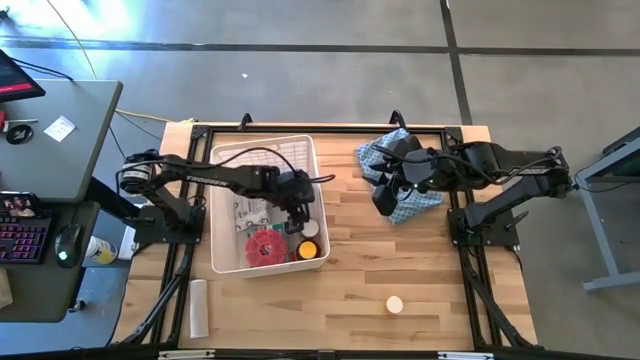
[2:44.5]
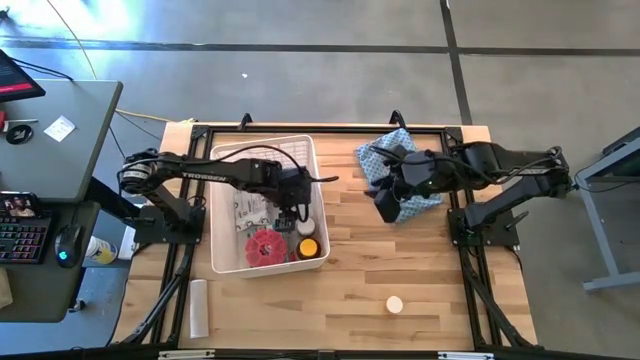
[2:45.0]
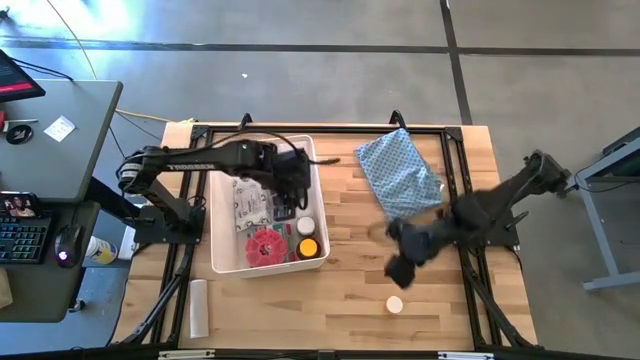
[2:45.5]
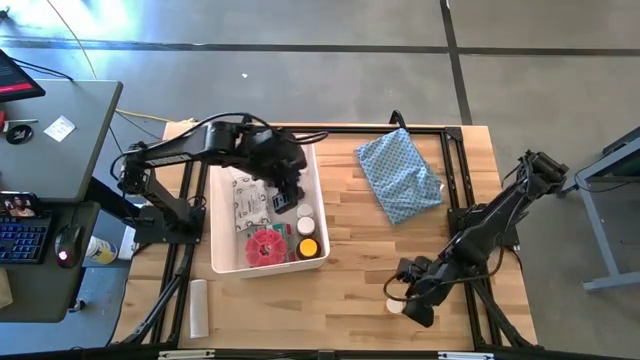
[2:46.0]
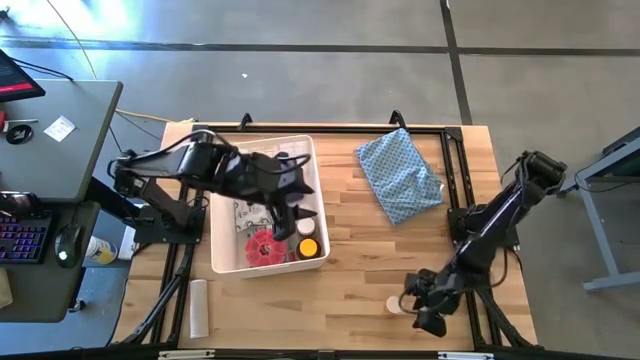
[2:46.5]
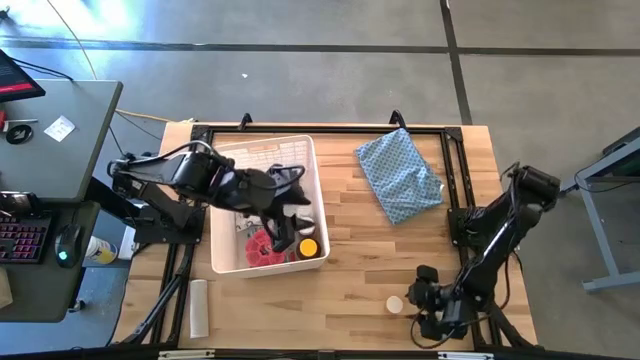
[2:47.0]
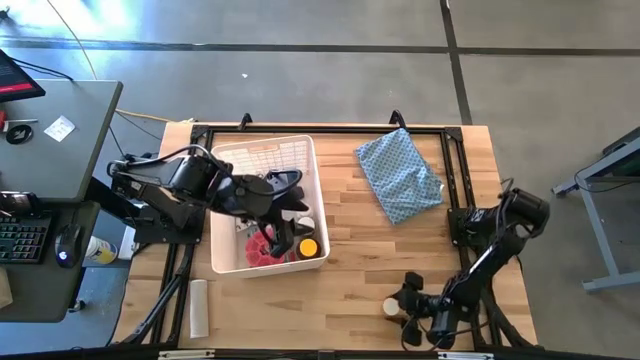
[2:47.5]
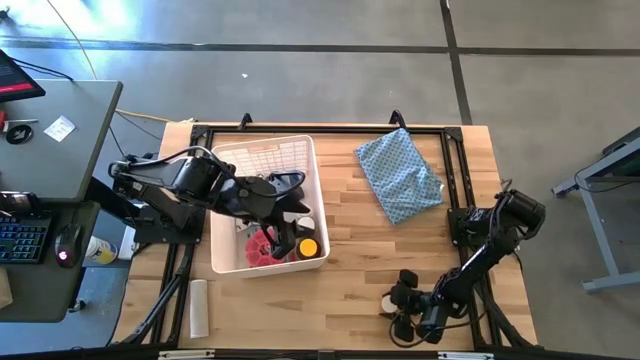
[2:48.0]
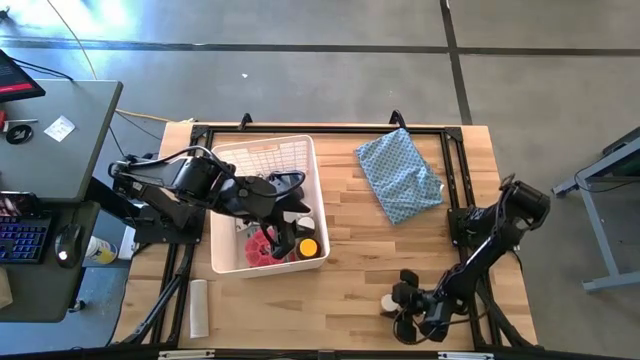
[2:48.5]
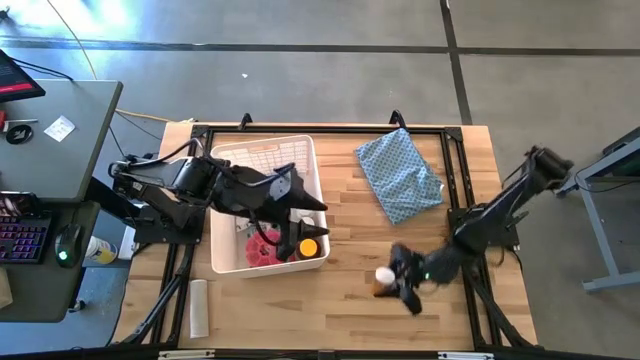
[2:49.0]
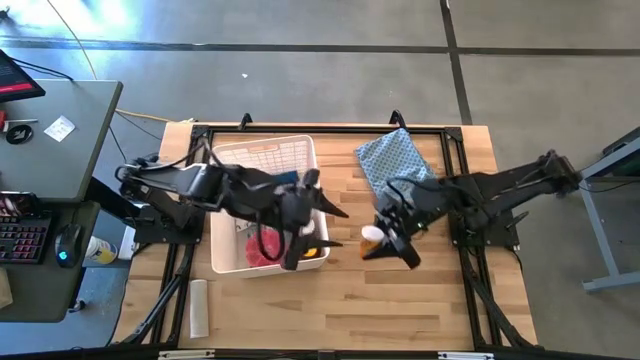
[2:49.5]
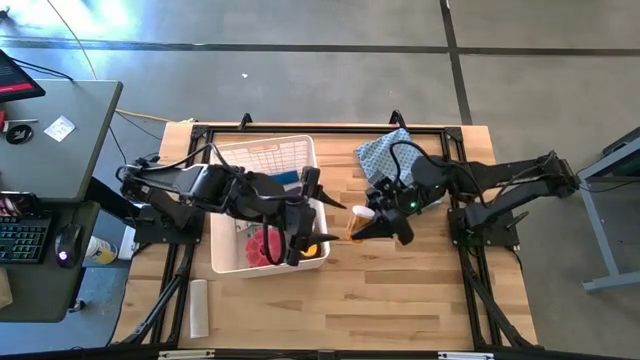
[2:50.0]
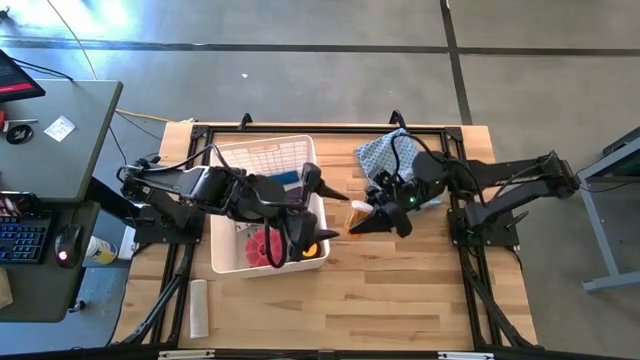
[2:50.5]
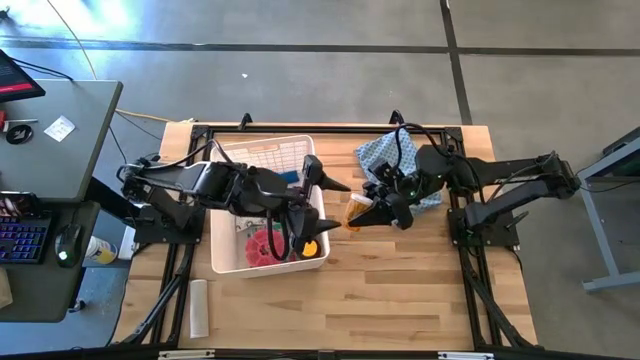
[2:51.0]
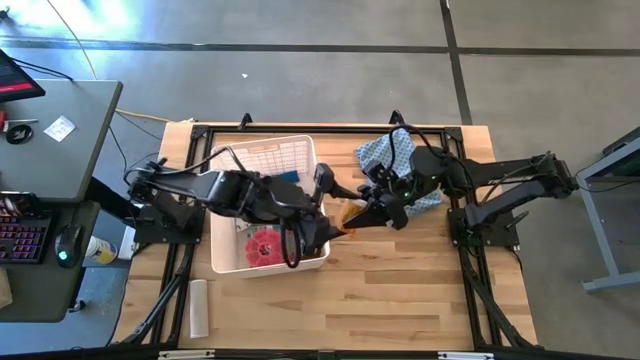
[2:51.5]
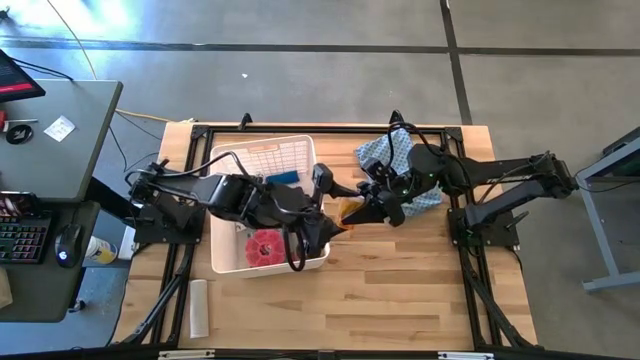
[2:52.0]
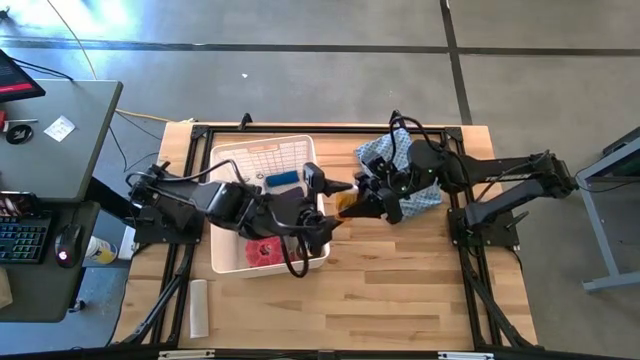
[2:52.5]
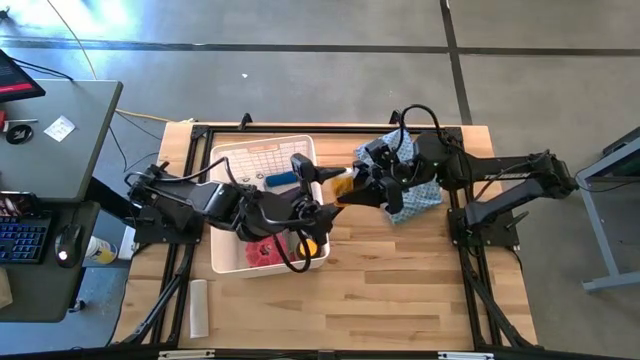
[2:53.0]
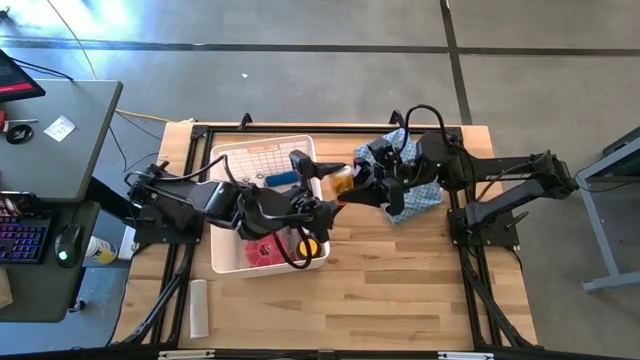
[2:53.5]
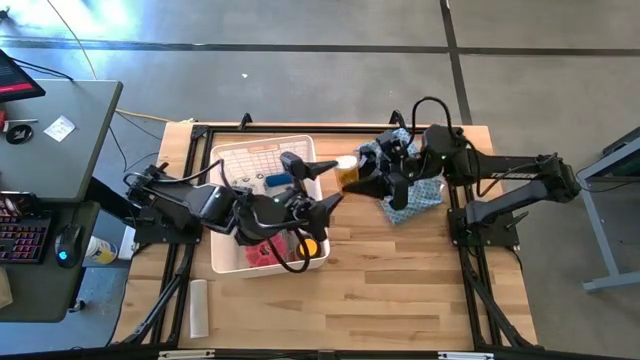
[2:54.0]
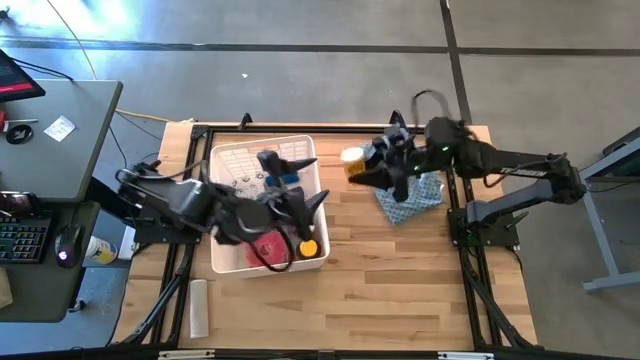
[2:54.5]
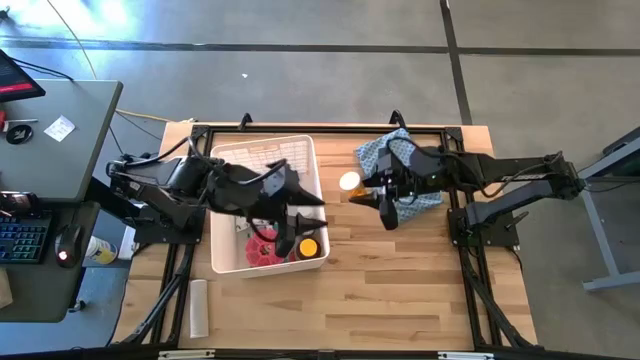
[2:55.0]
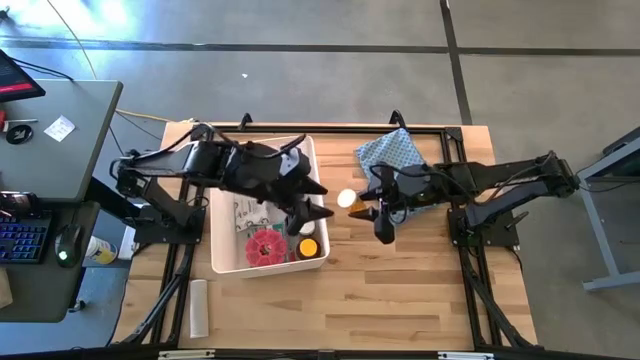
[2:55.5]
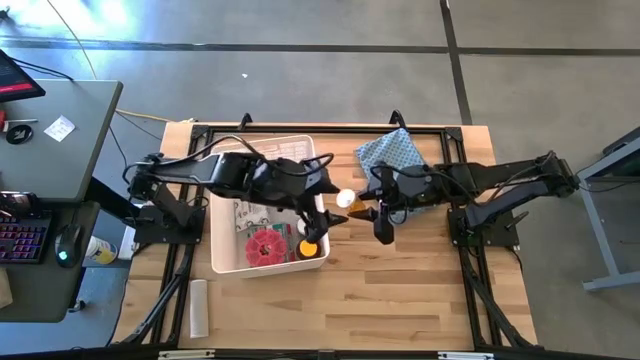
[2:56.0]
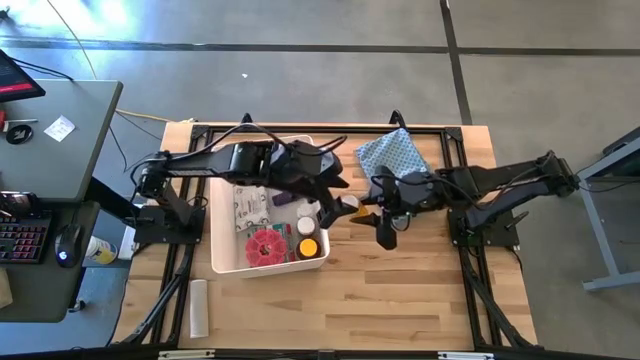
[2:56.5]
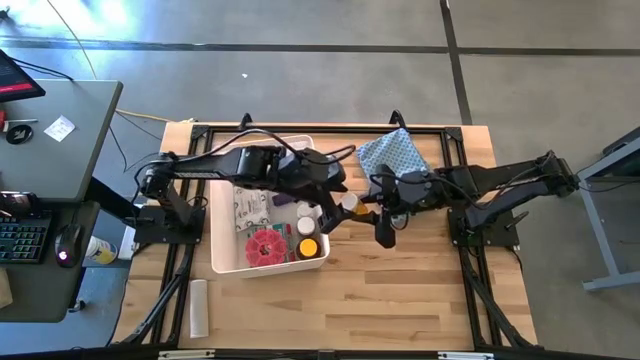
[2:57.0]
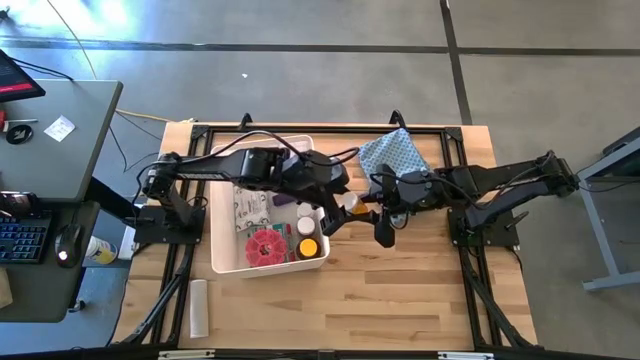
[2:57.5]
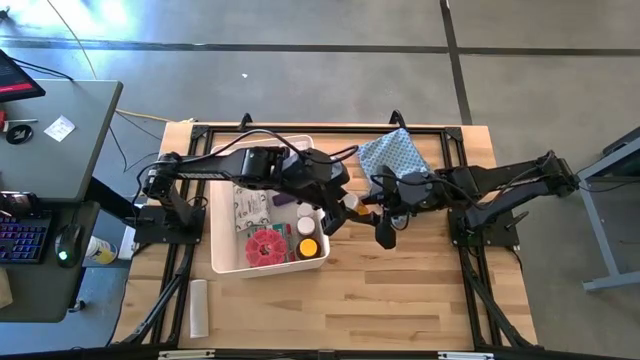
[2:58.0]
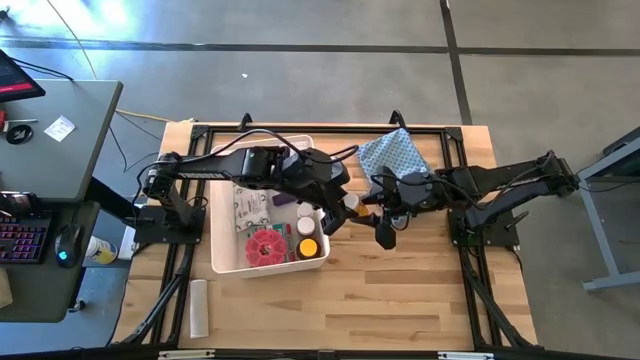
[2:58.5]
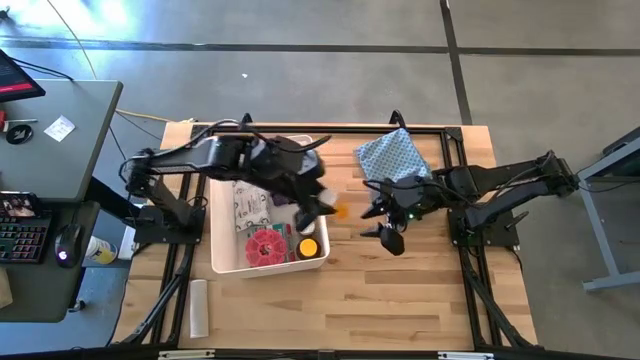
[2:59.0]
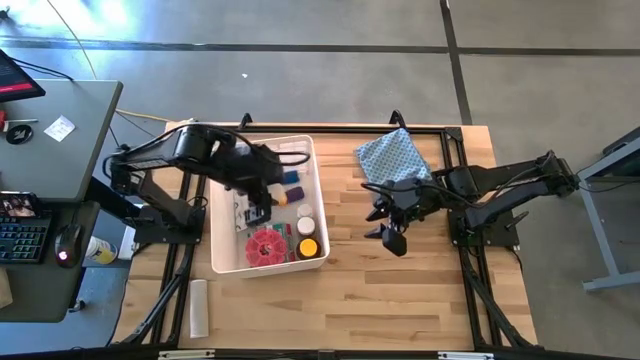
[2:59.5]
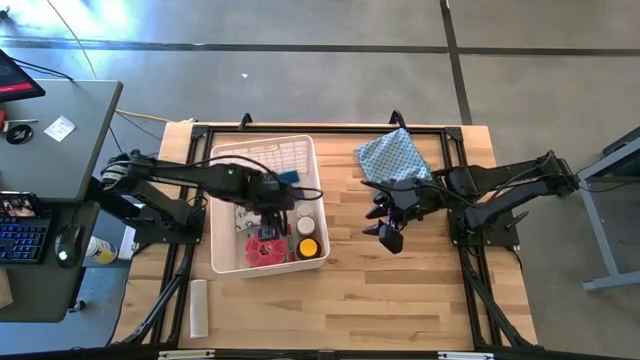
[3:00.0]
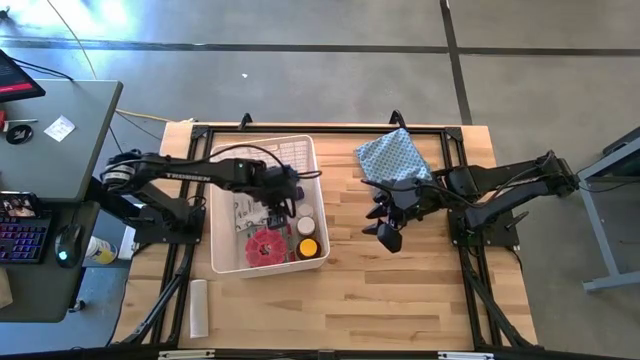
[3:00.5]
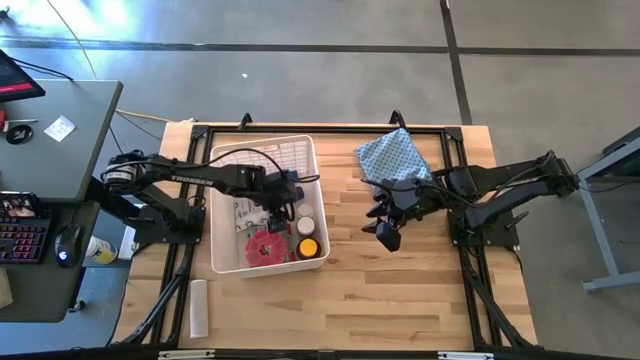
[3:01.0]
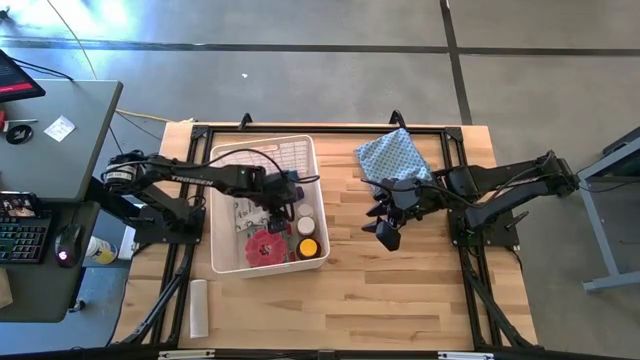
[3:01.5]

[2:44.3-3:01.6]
Task: Pick & place medical supplies in basket/bin
Put the orange pill bottle into the white bin

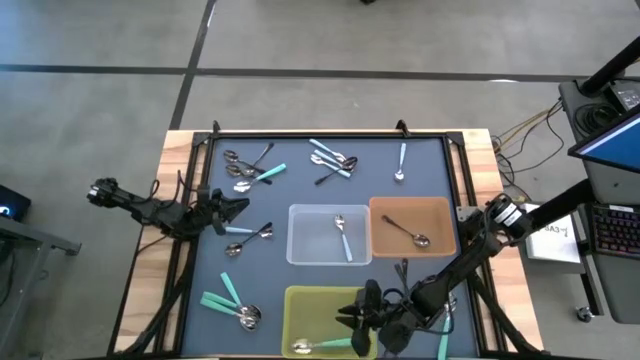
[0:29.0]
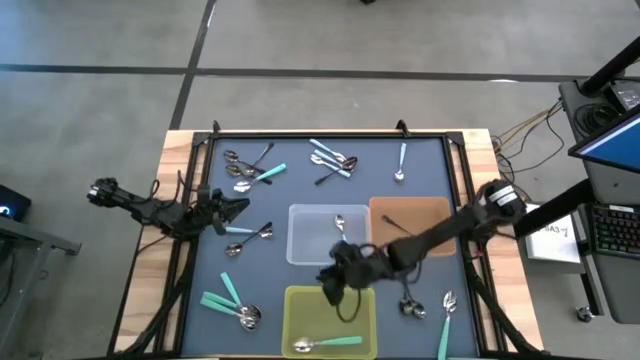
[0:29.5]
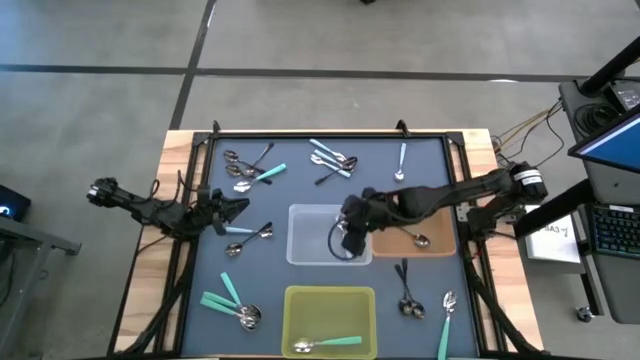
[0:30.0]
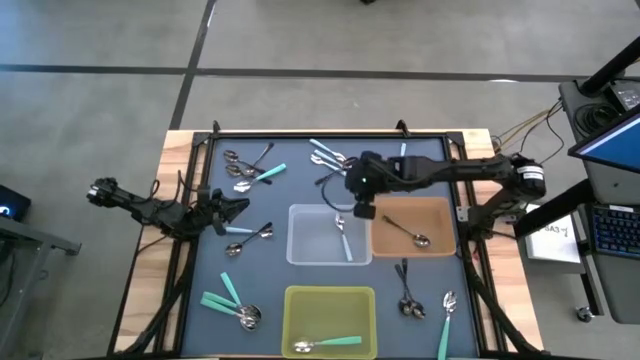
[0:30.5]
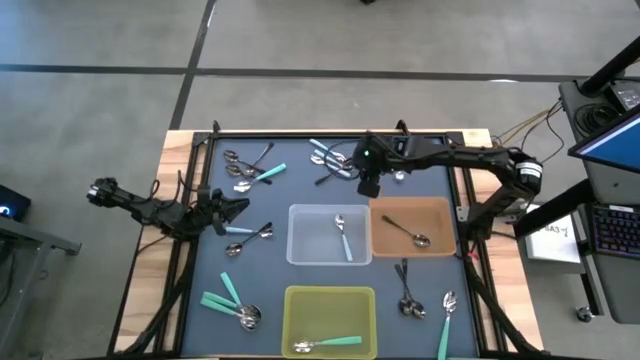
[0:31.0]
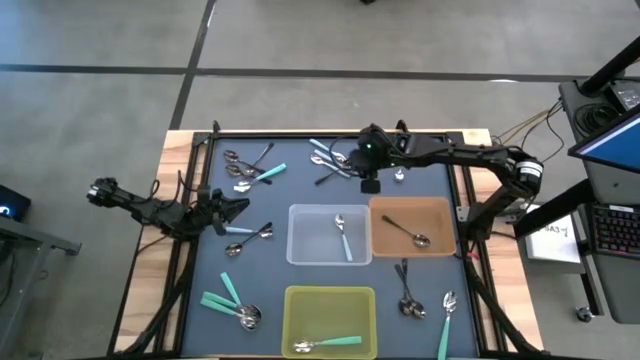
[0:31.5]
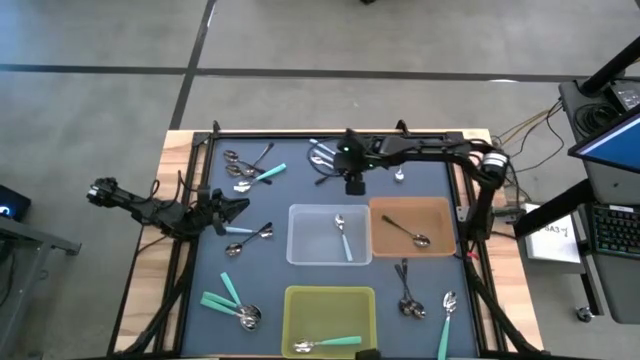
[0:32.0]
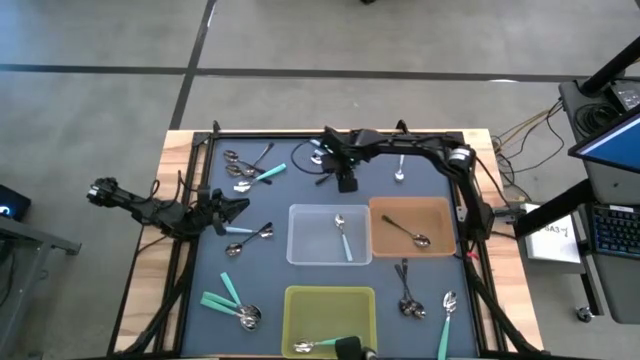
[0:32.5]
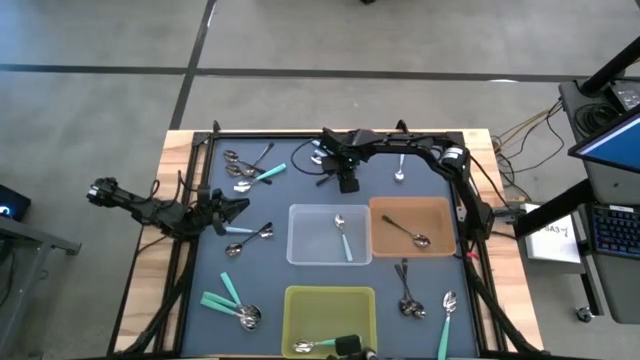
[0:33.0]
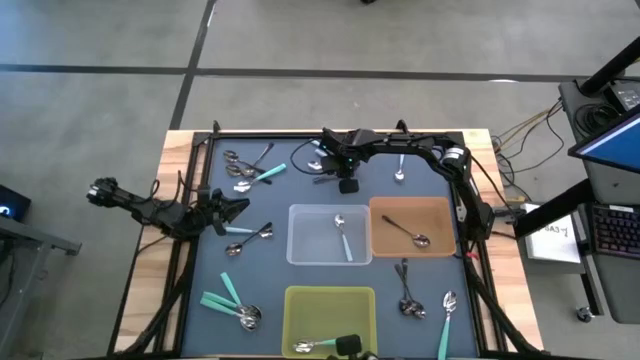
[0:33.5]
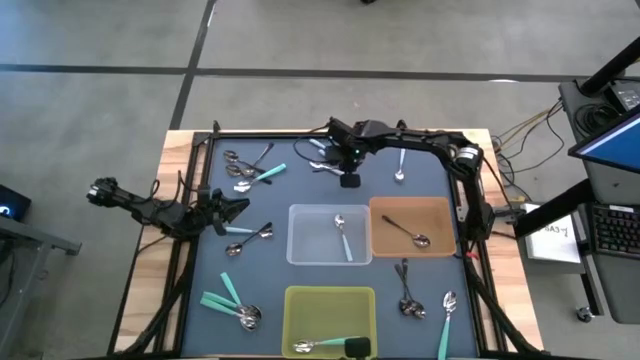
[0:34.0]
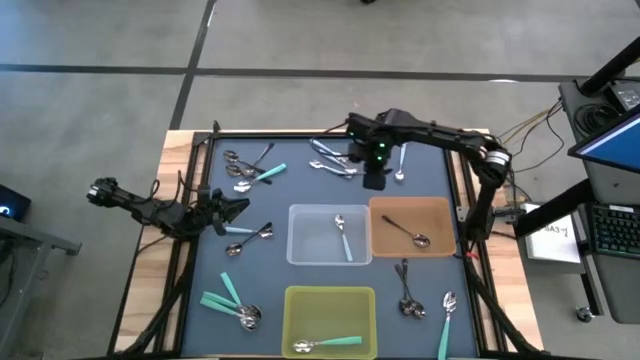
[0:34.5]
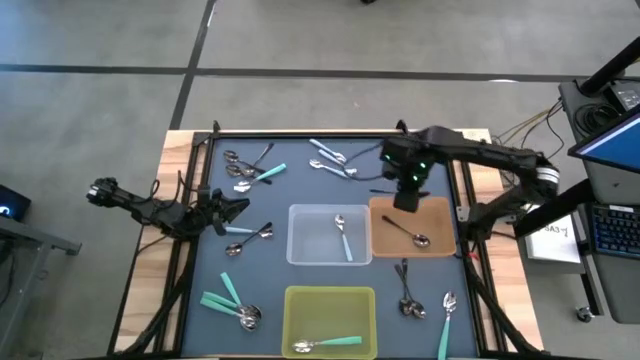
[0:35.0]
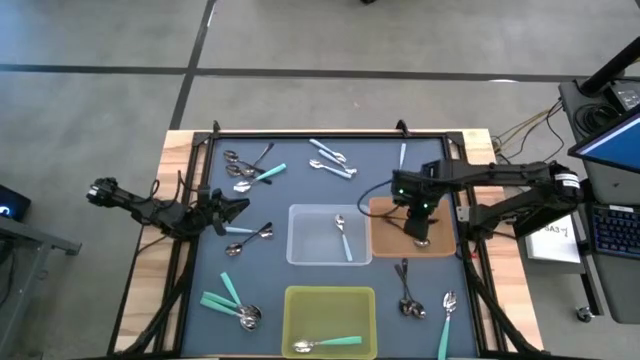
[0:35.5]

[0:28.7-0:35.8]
Task: Sort silverware by color (type)
Put the black spoon into the orange bin
